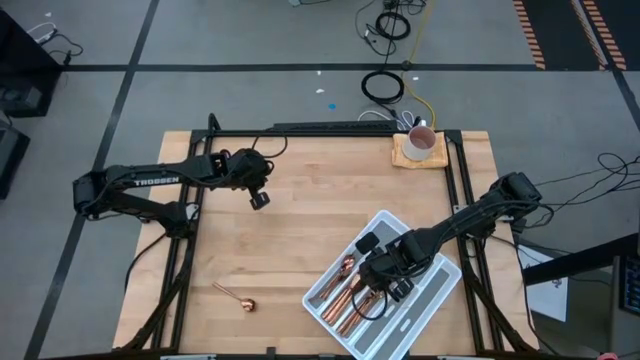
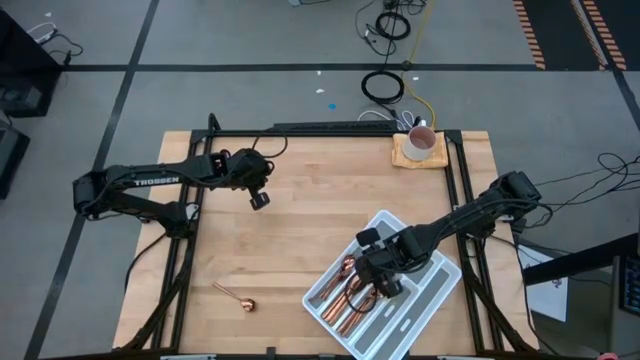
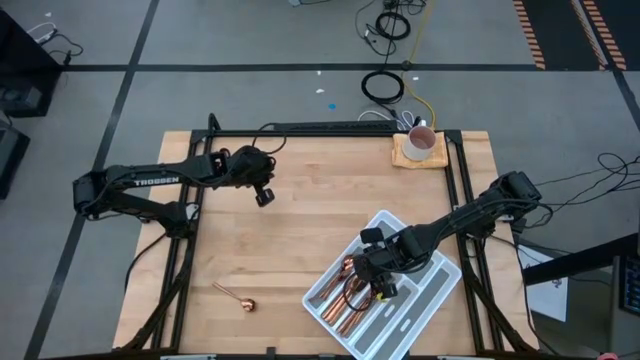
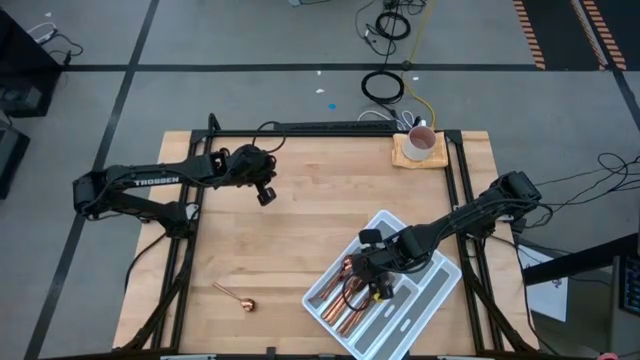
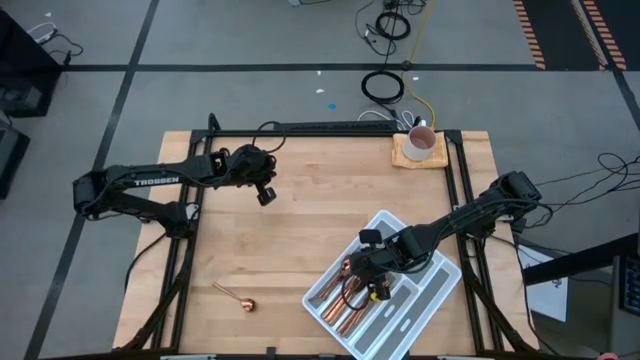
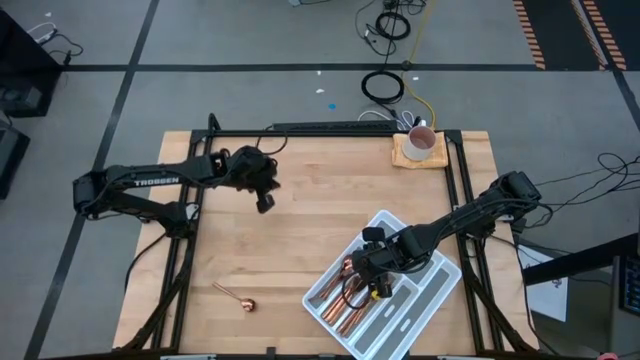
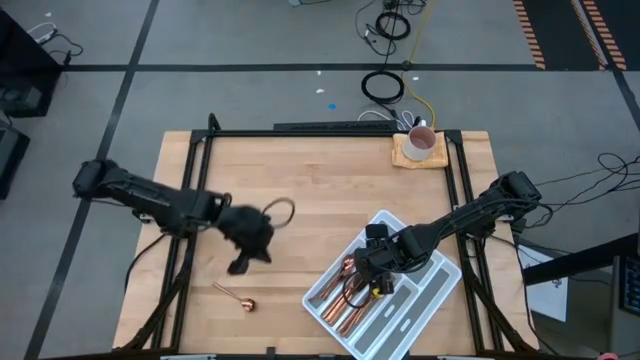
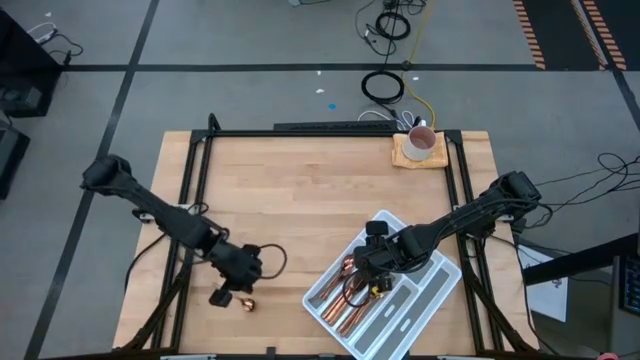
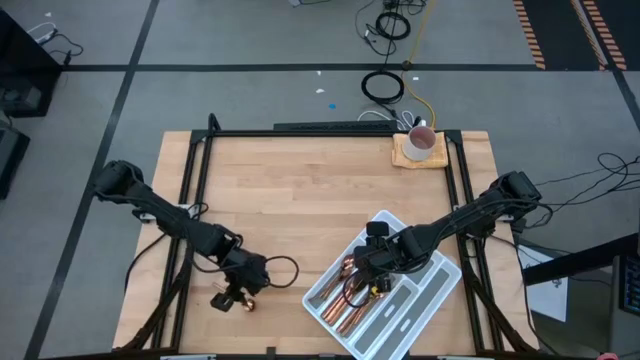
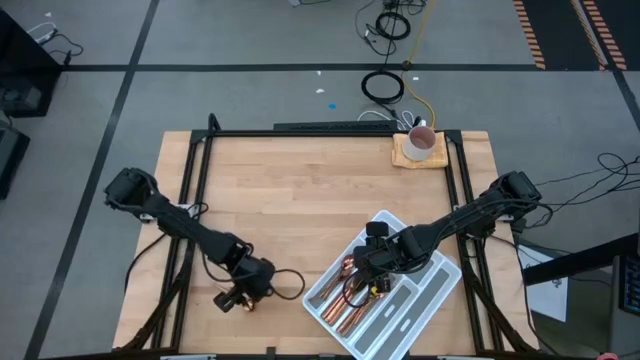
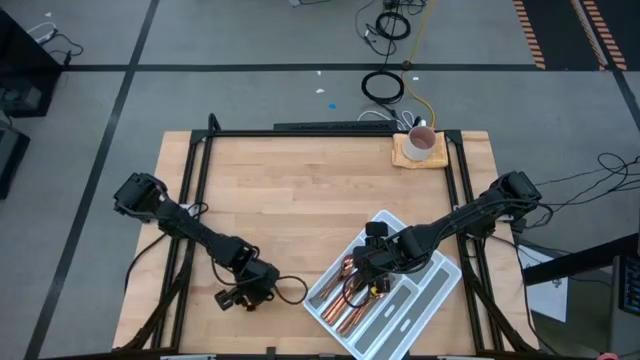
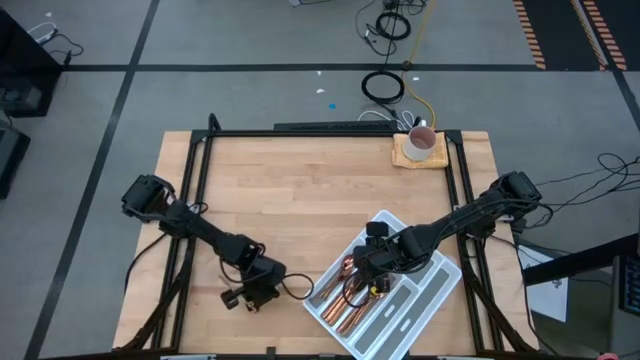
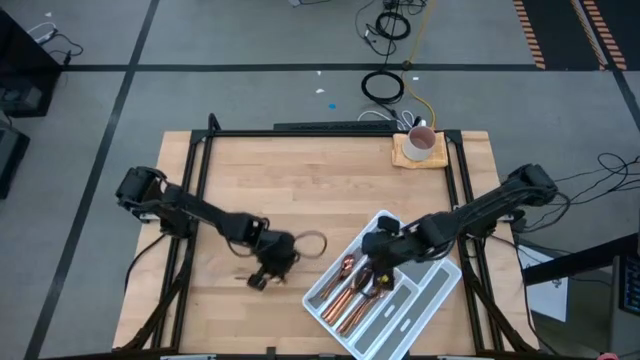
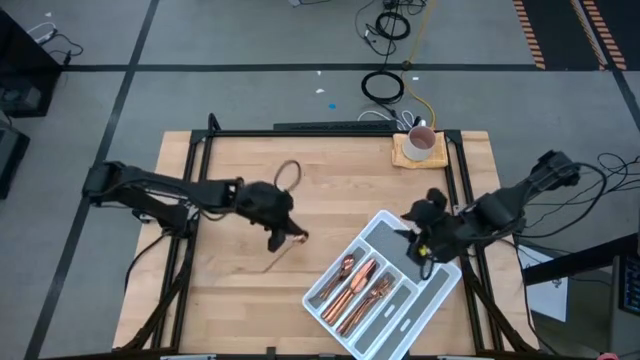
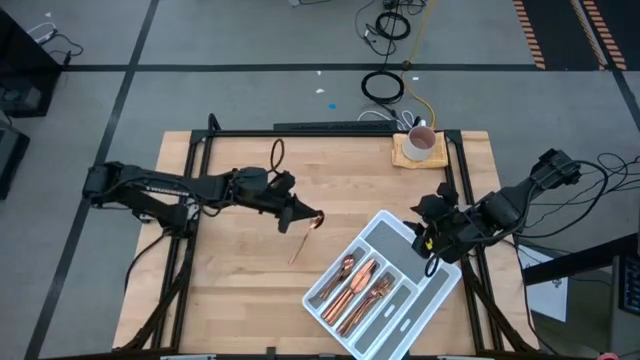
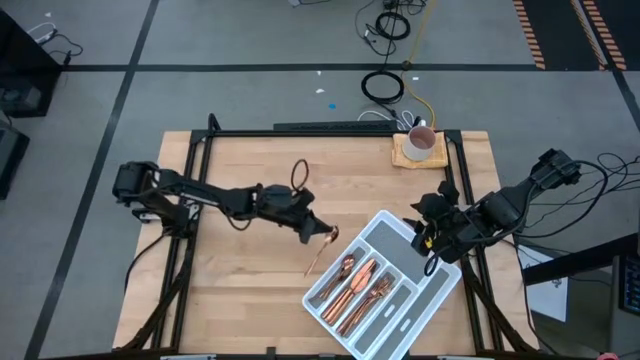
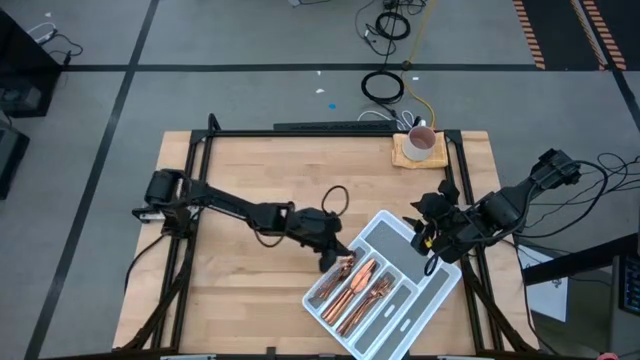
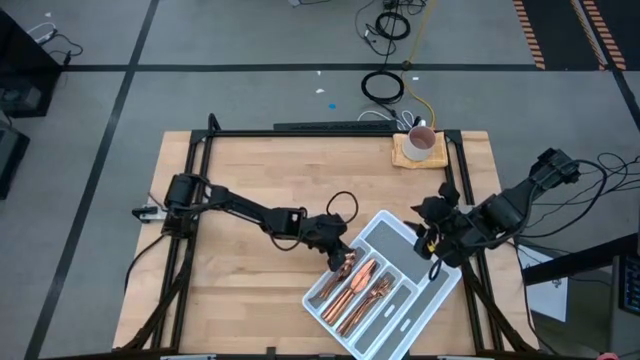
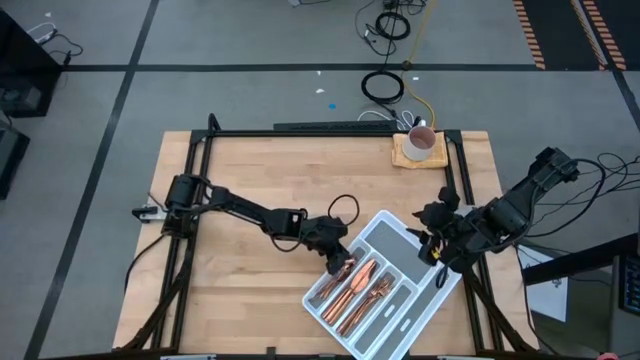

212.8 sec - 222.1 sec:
Task: Sort silverware
Put the gold spoon into the cutlery tray with the other gold spoons

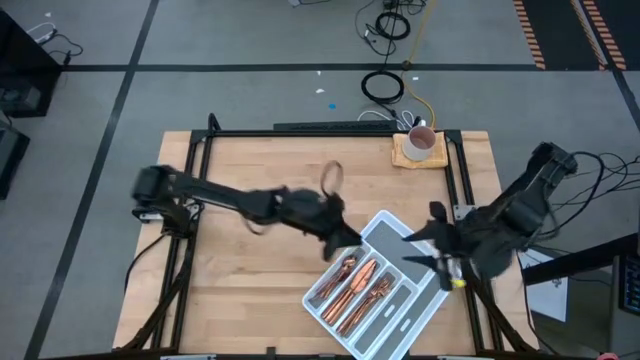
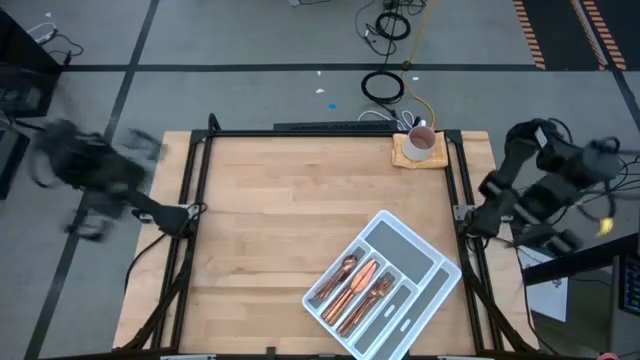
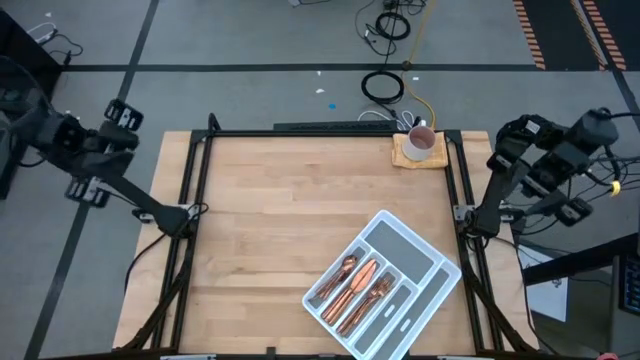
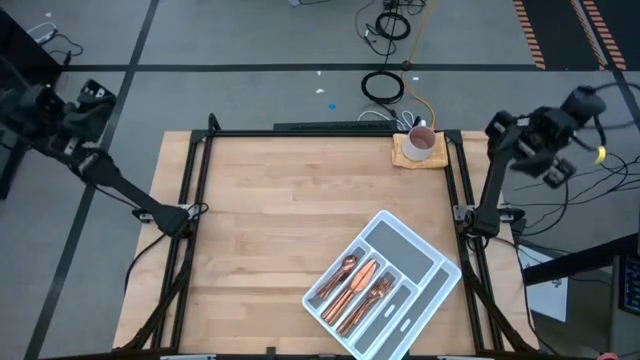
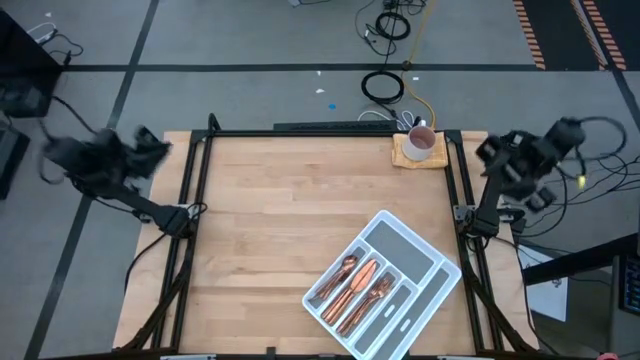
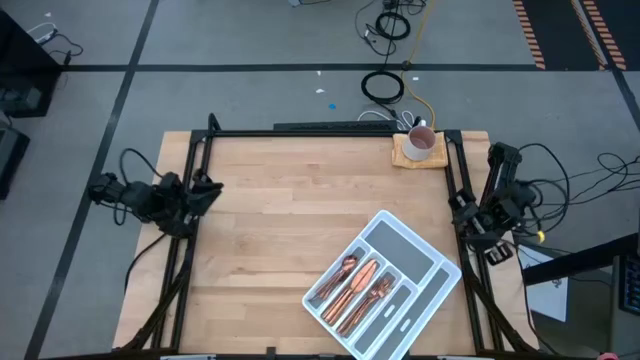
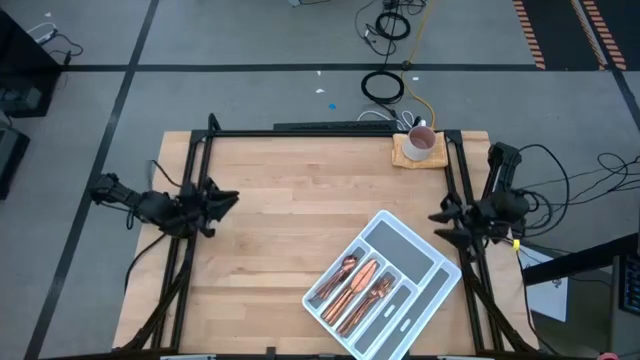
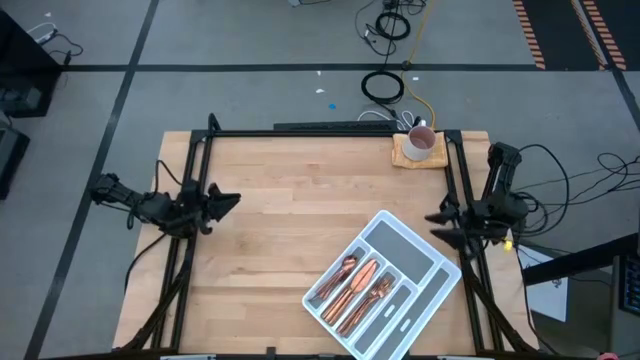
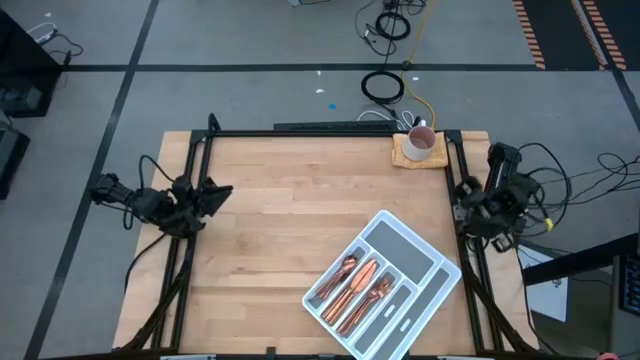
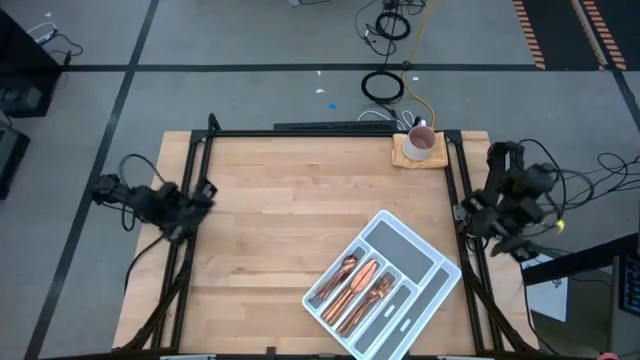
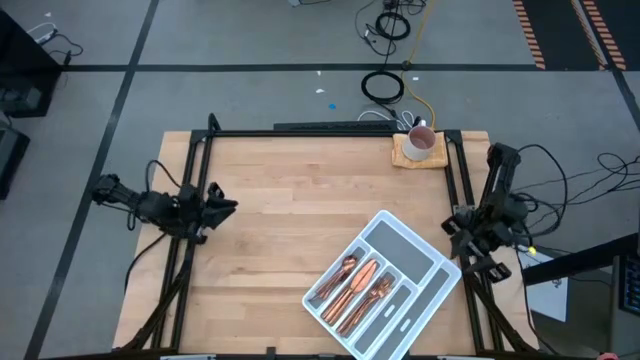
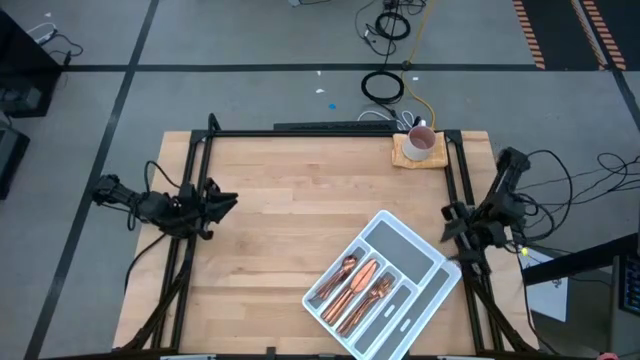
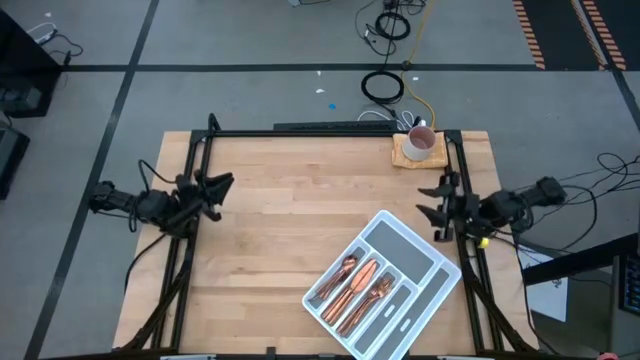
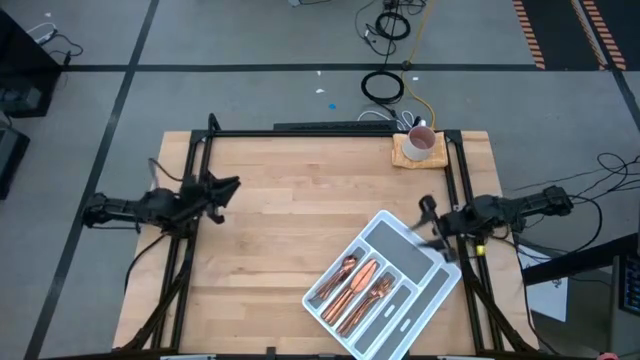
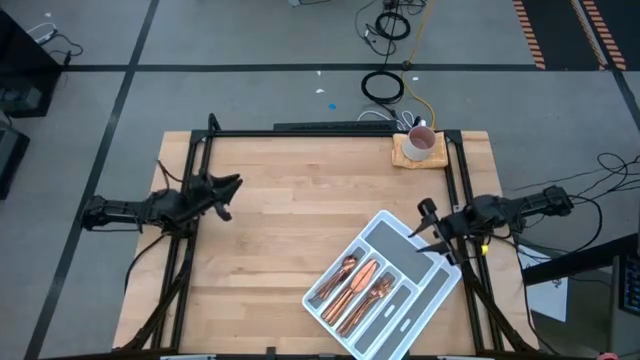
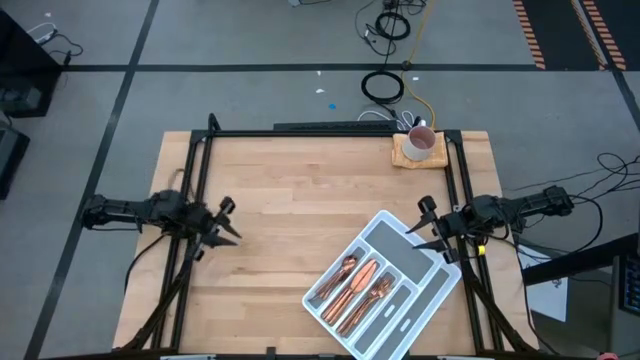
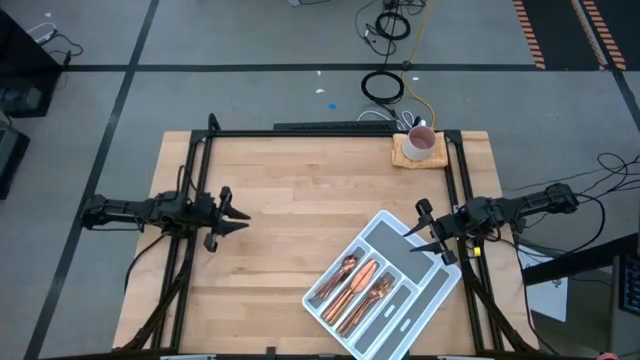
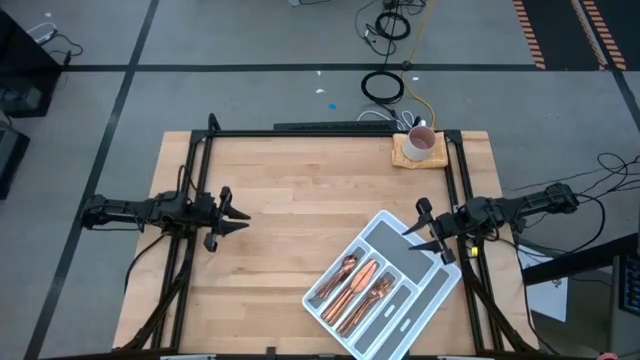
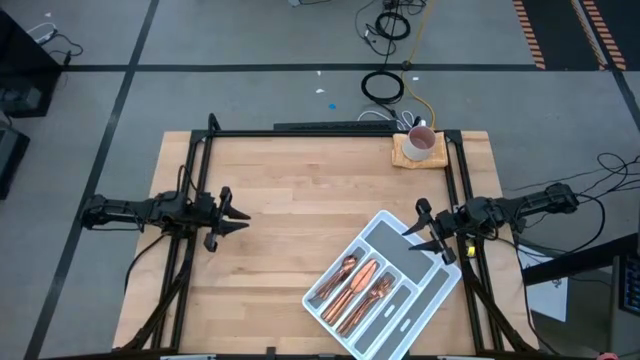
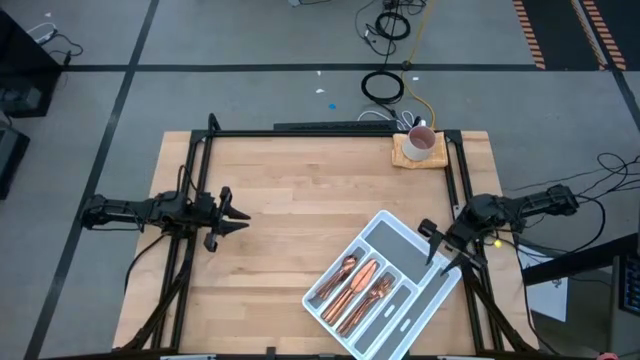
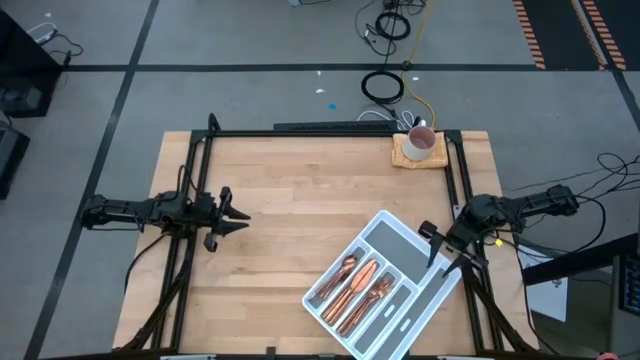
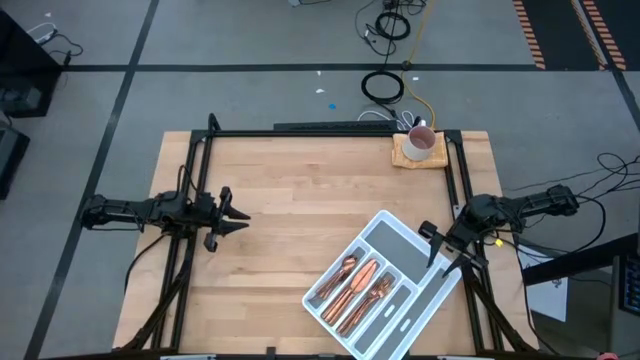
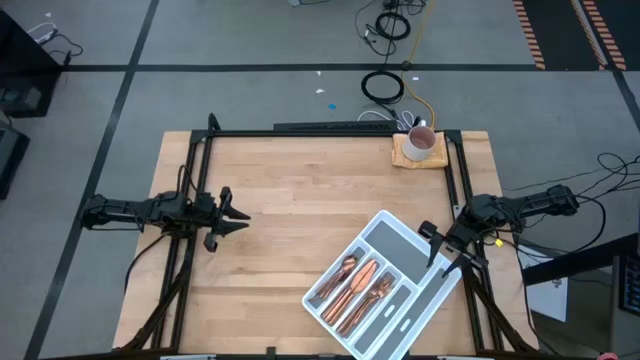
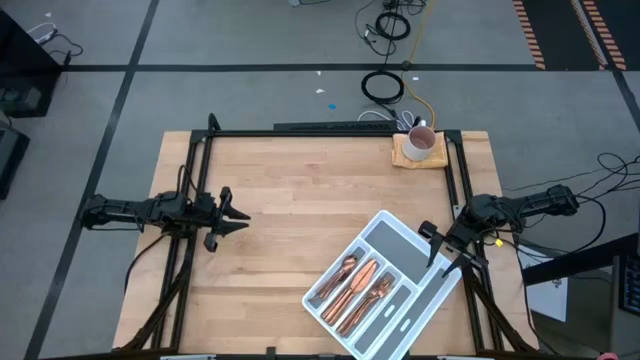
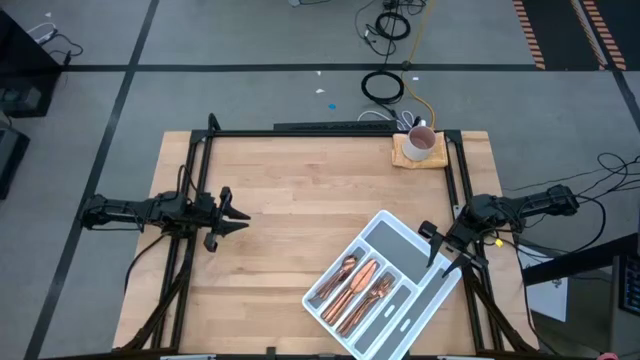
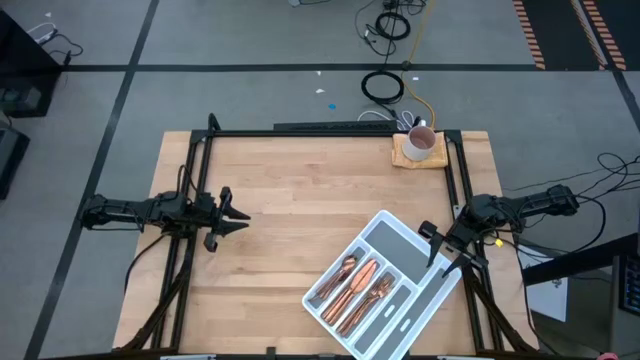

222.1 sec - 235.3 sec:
Return to Home Position
